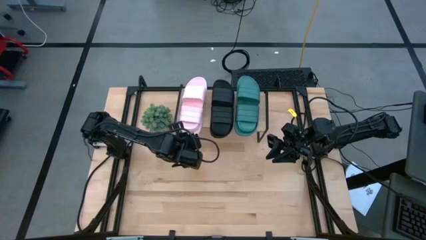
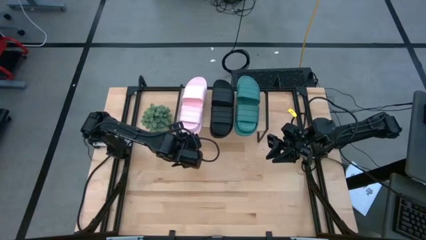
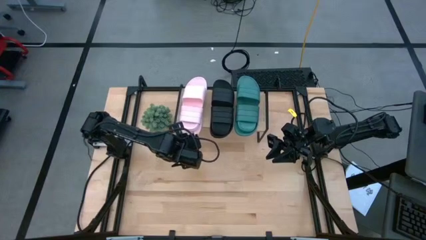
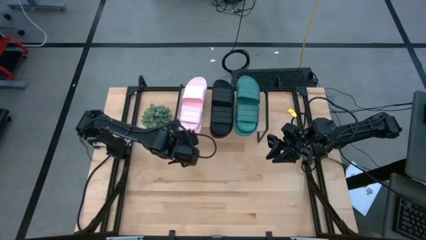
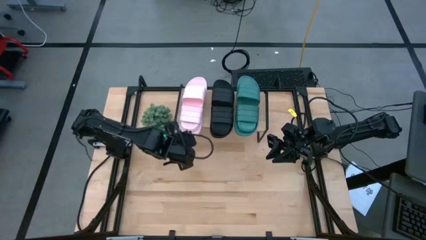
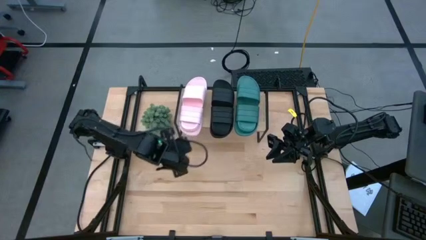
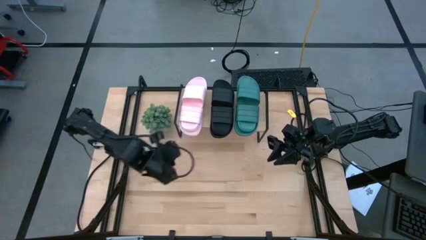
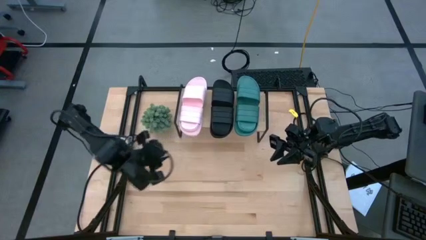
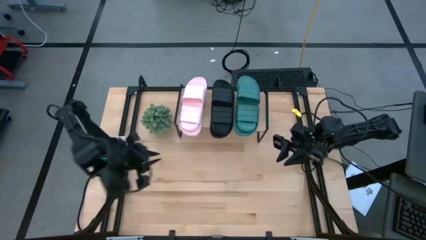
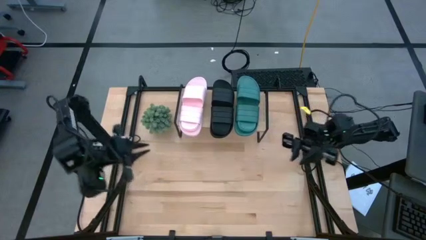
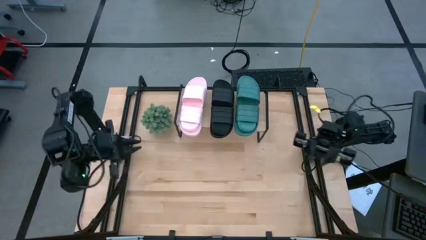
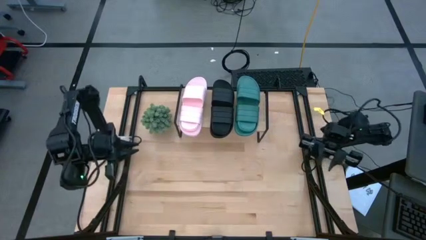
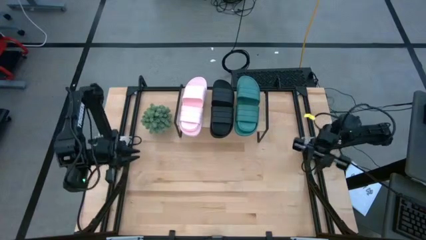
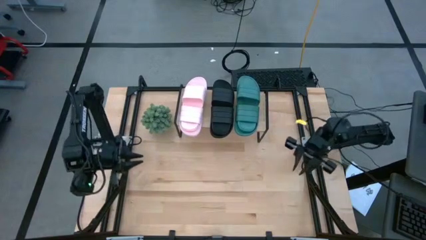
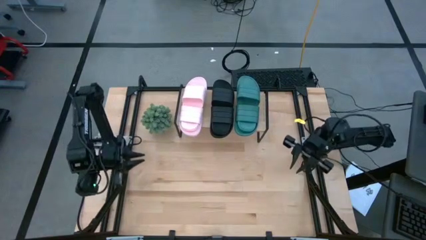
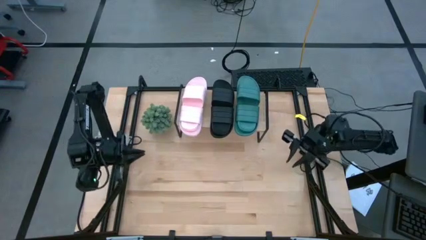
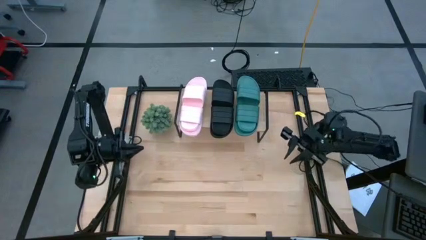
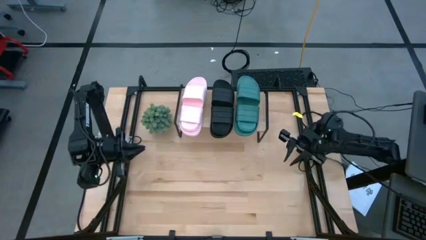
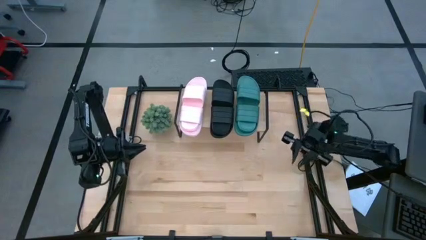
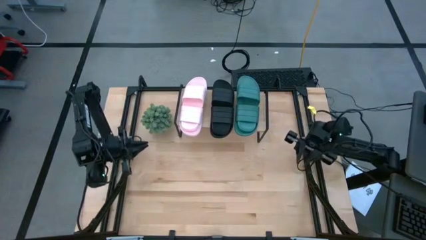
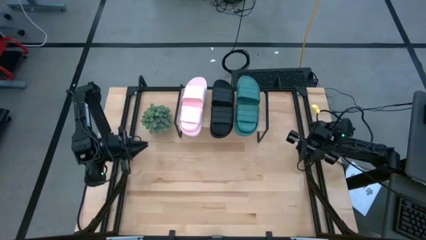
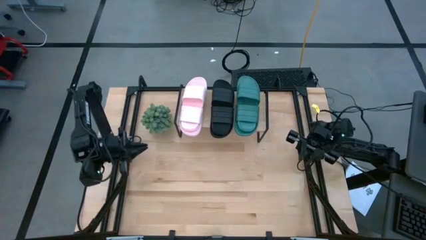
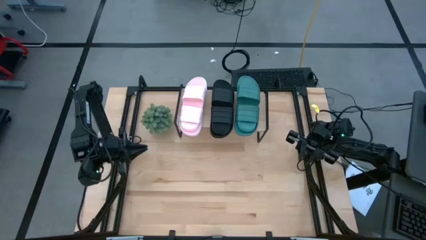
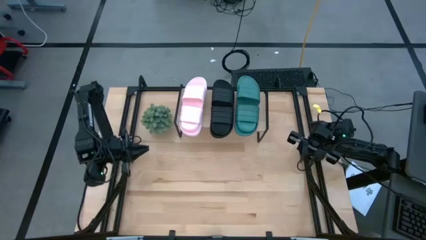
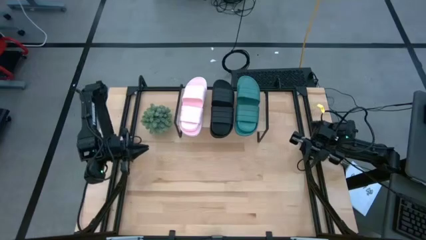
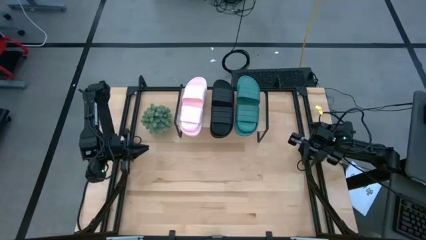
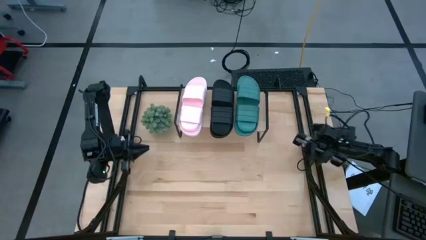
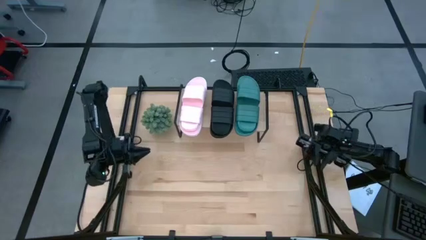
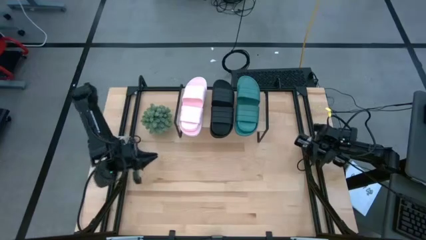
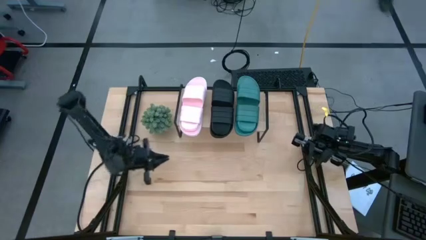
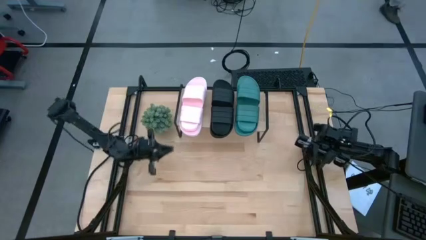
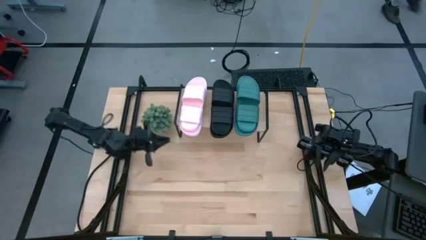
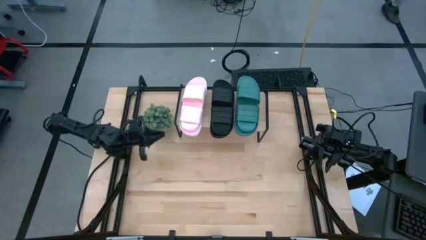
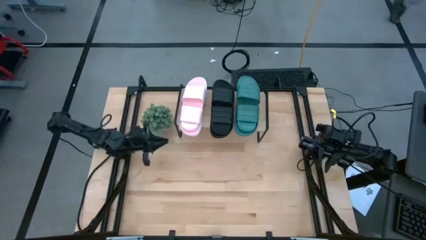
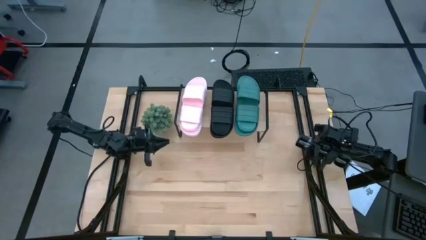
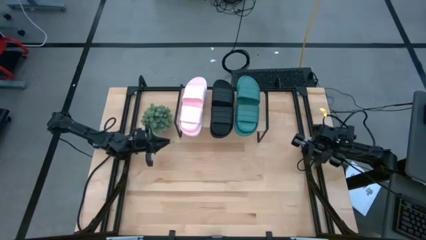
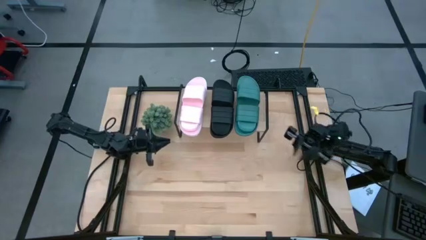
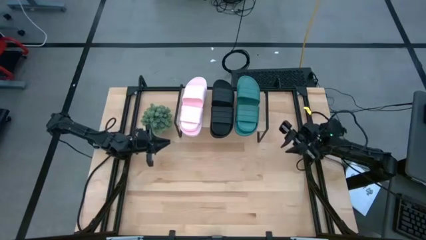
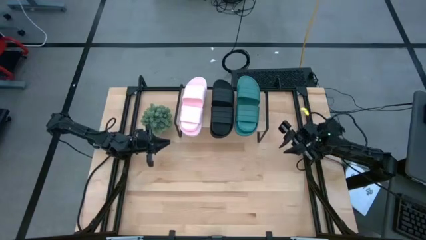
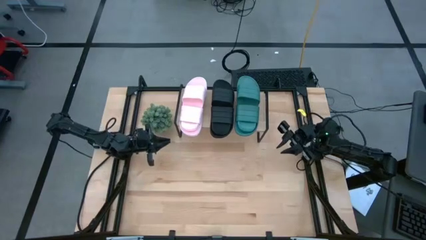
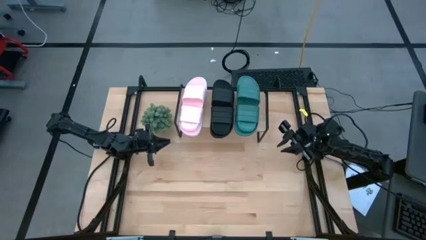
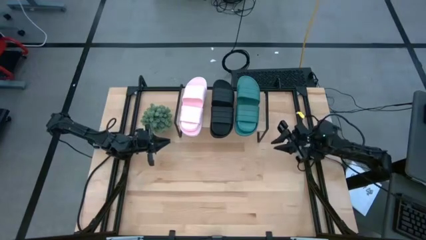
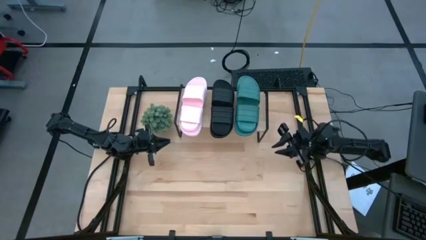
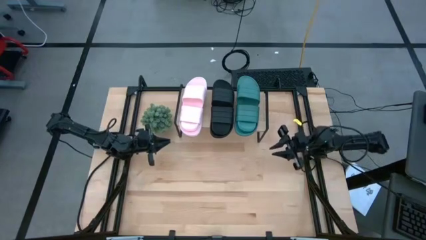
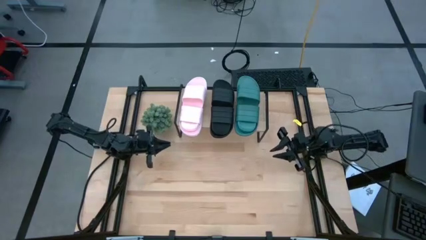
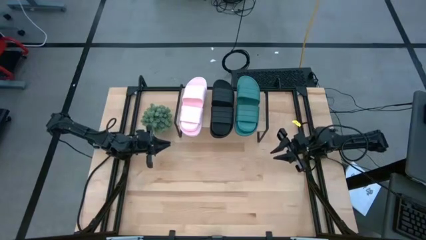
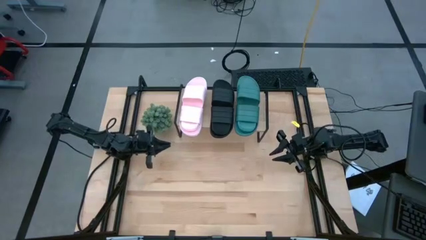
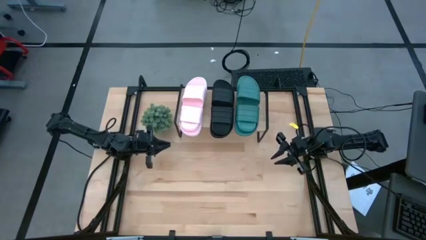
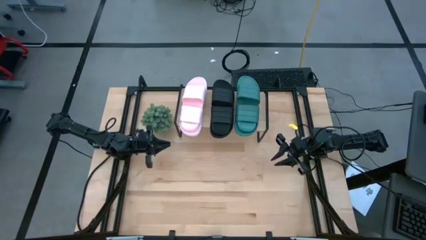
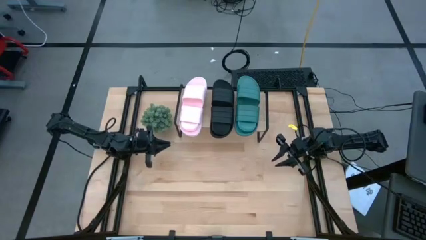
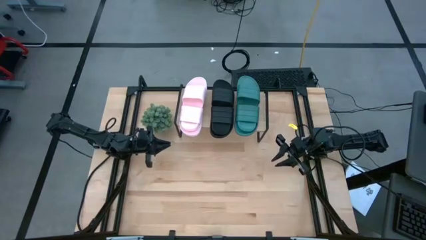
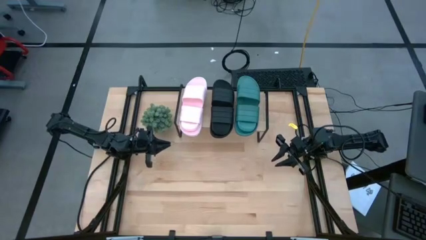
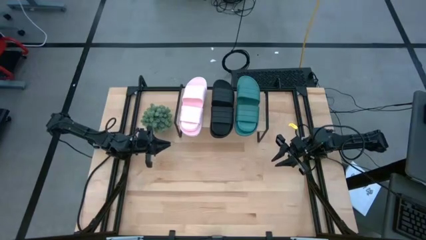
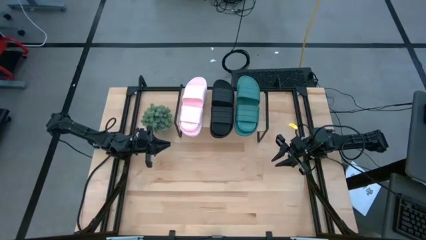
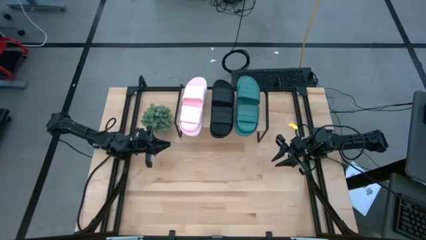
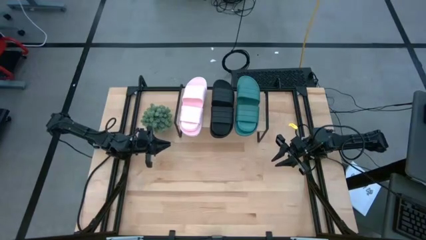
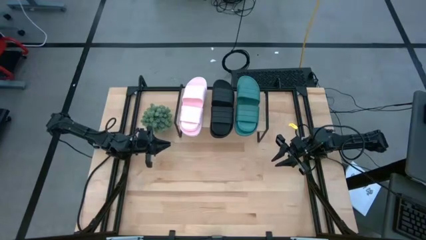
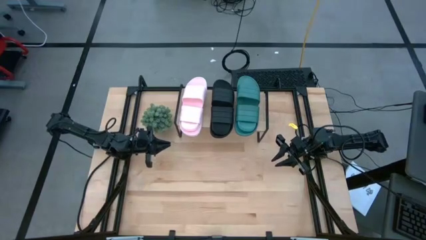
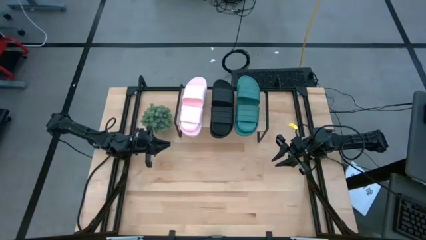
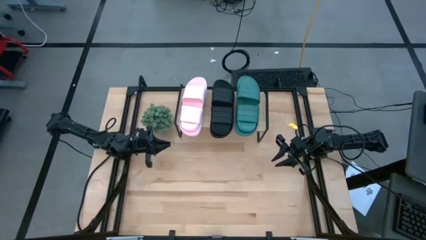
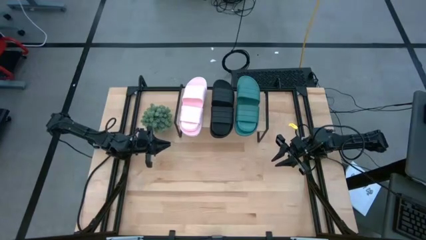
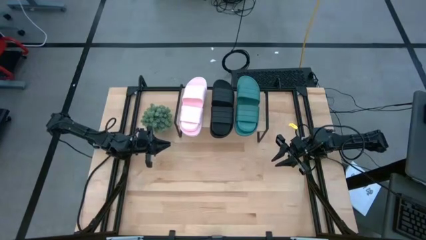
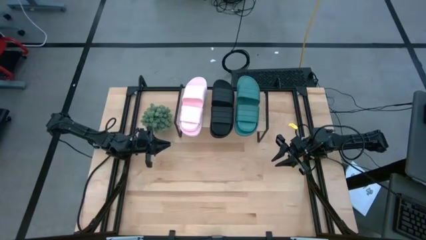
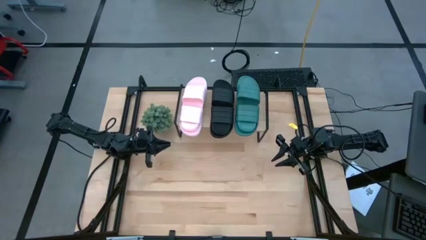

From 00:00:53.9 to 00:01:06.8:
Task: Pick and place slides into the shelf
Return to Home Position

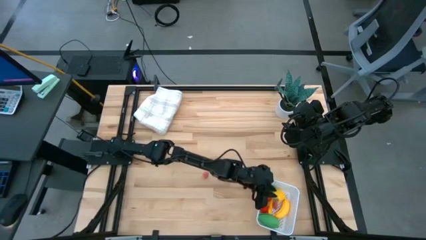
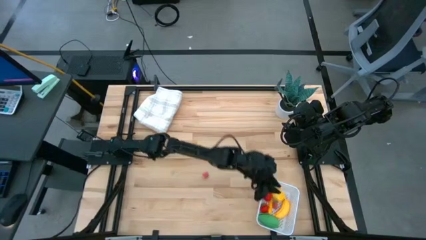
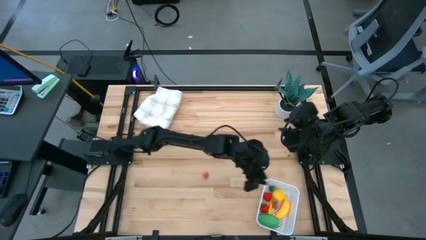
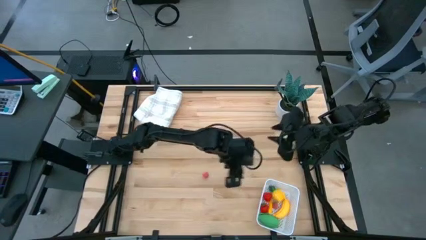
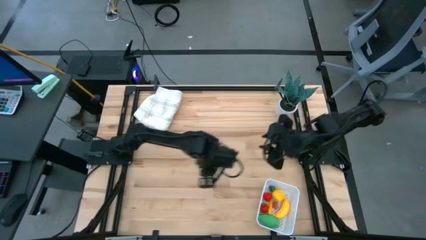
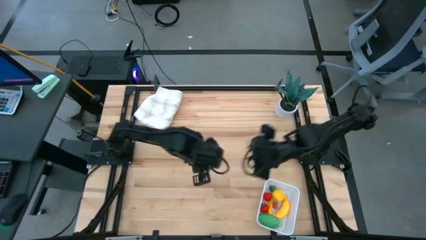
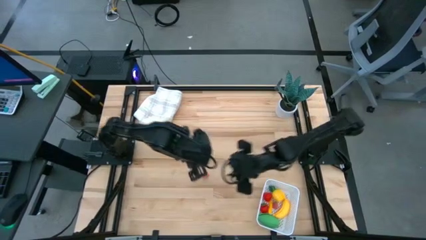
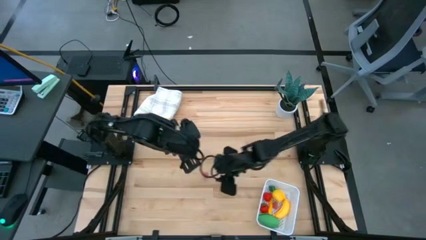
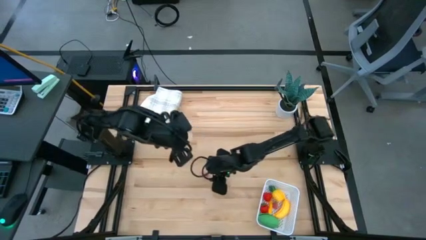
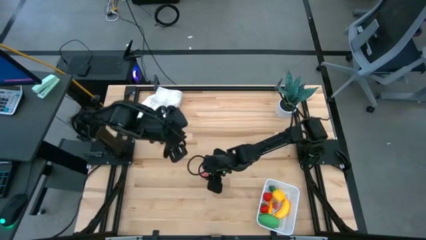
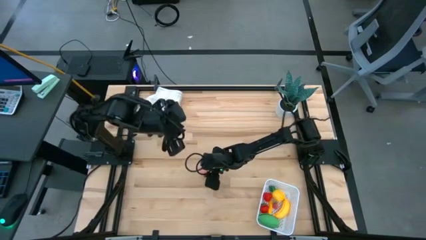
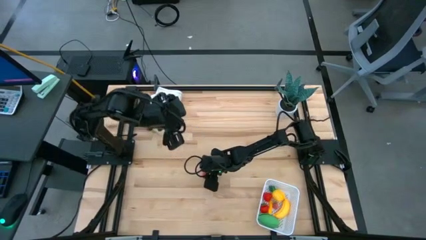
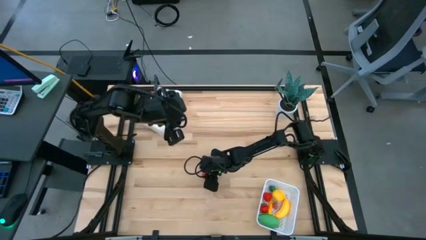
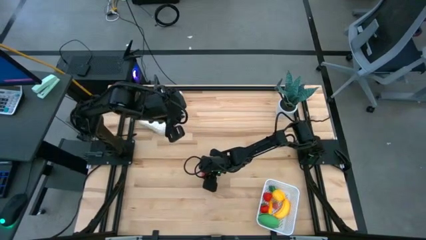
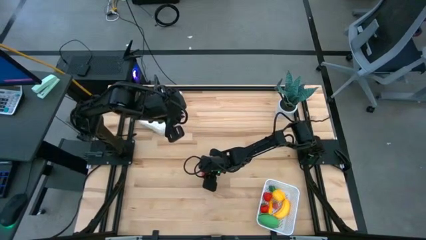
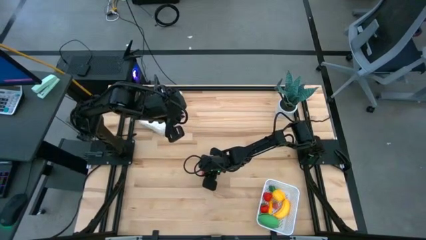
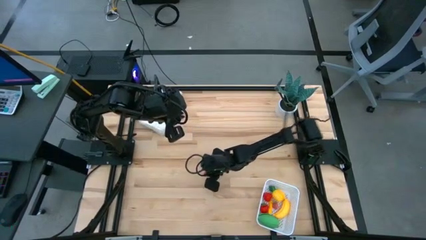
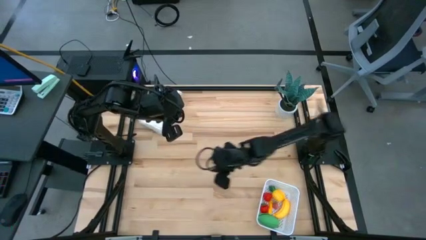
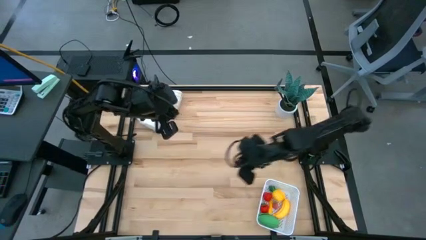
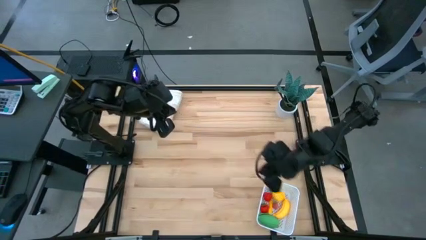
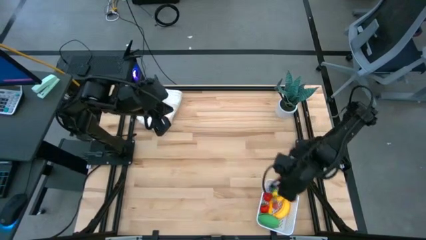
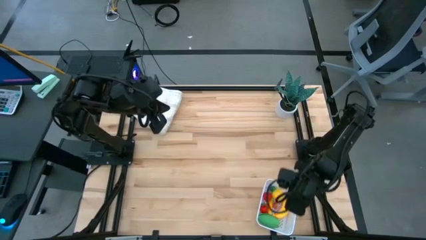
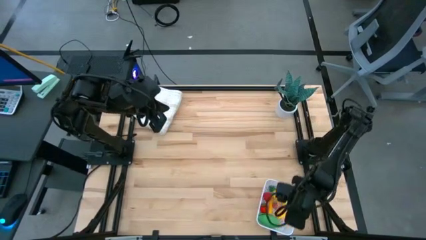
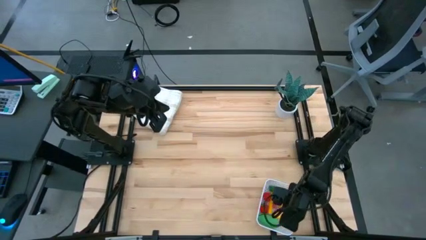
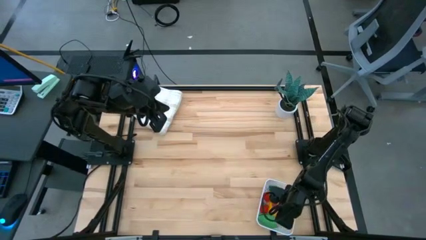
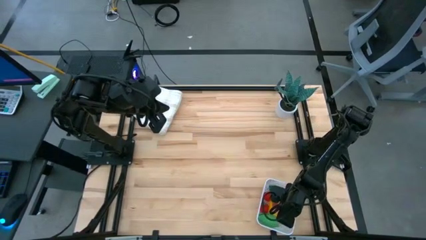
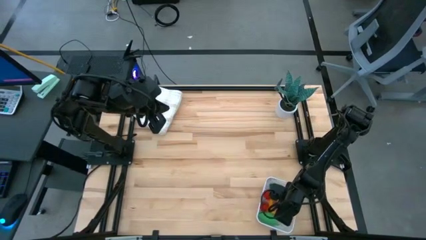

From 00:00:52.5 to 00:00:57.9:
Task: Pick and placing Produce into tupperware
Put the pink peach into the white basket
